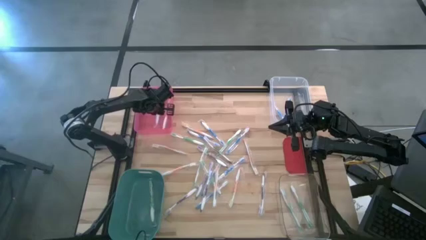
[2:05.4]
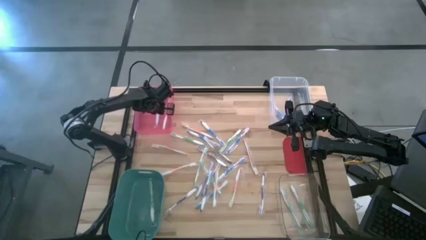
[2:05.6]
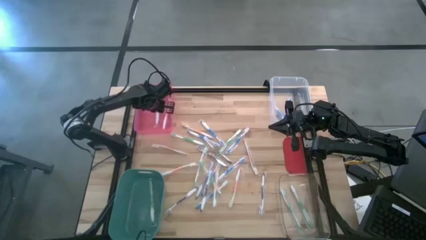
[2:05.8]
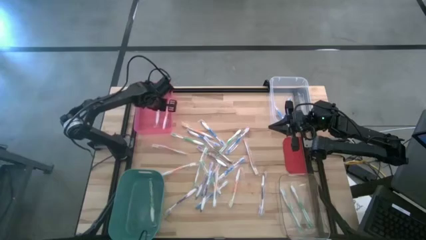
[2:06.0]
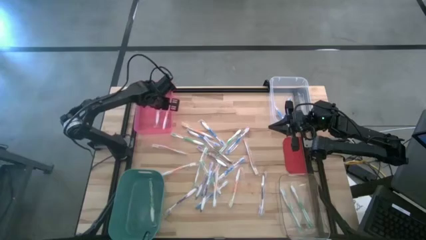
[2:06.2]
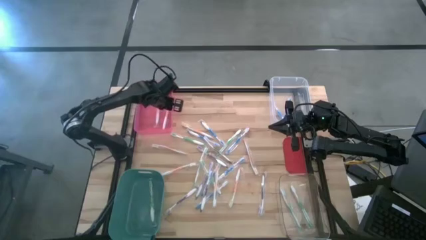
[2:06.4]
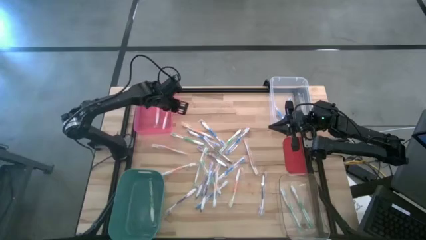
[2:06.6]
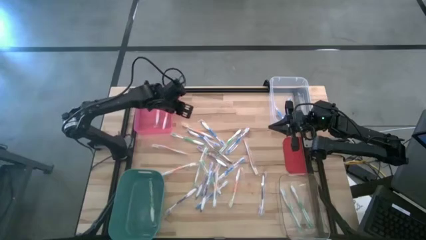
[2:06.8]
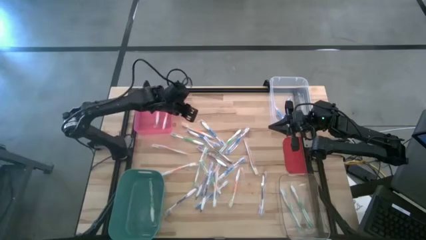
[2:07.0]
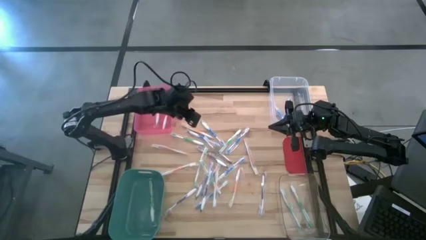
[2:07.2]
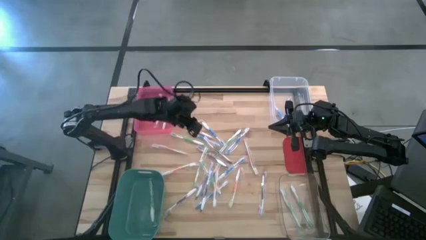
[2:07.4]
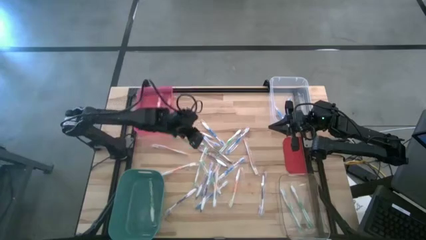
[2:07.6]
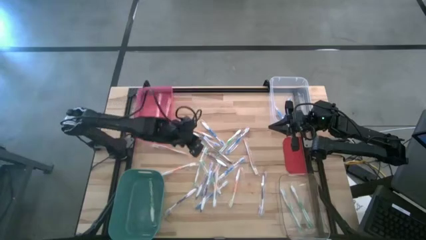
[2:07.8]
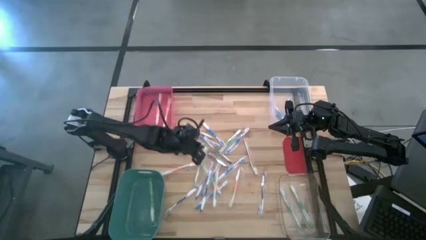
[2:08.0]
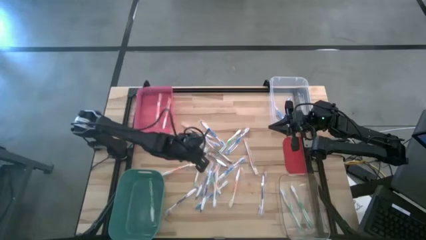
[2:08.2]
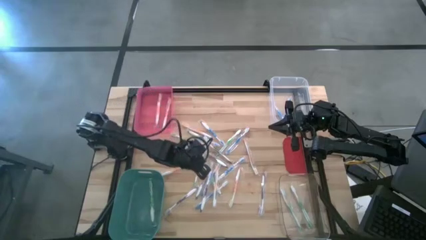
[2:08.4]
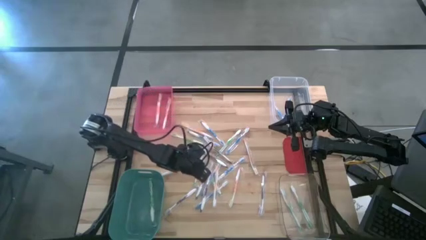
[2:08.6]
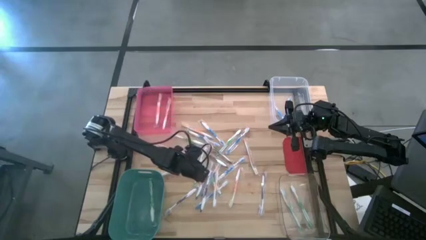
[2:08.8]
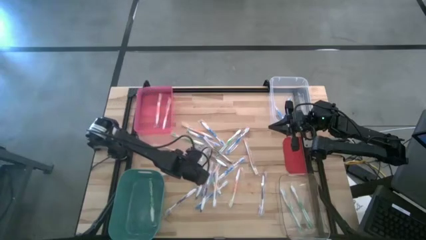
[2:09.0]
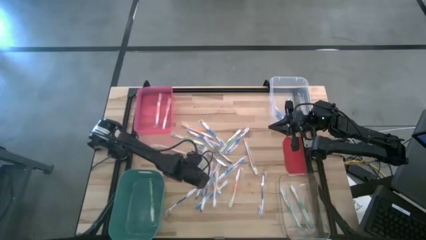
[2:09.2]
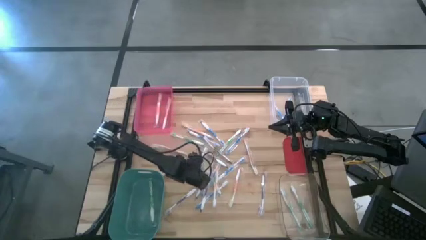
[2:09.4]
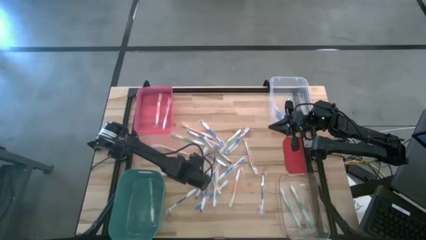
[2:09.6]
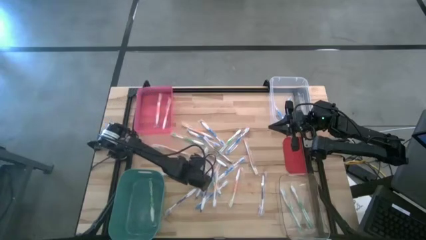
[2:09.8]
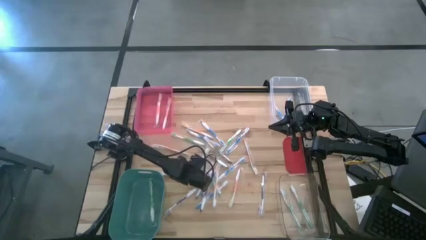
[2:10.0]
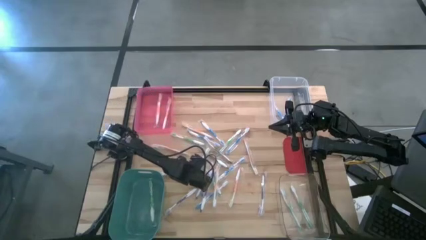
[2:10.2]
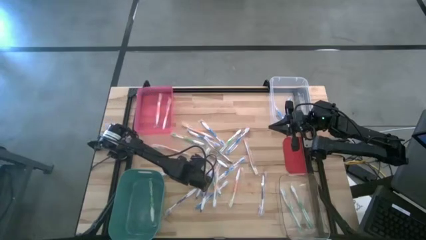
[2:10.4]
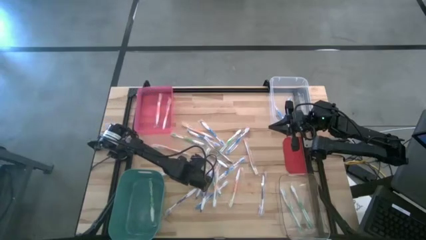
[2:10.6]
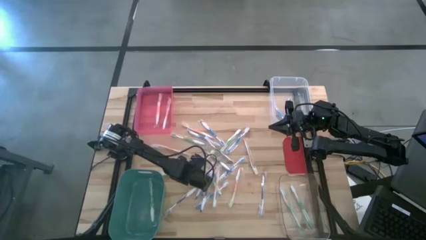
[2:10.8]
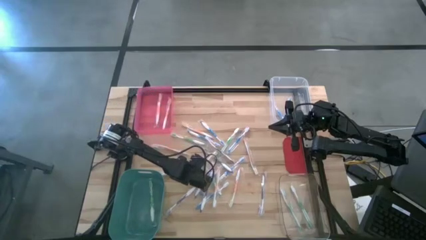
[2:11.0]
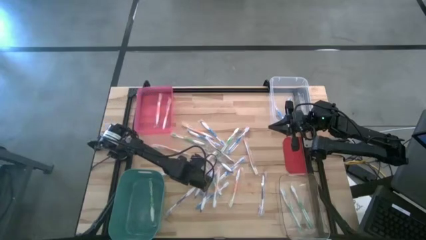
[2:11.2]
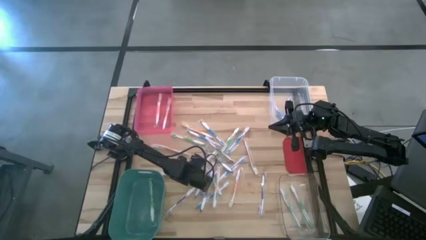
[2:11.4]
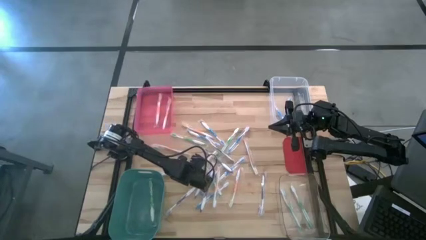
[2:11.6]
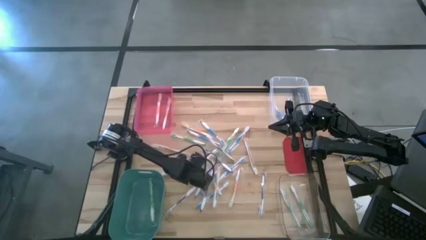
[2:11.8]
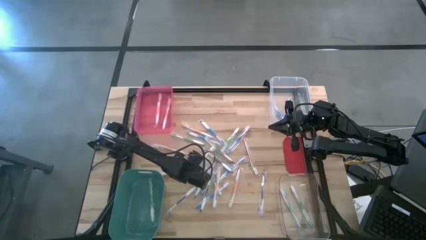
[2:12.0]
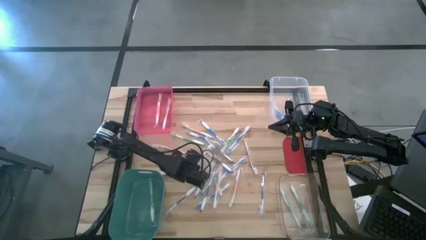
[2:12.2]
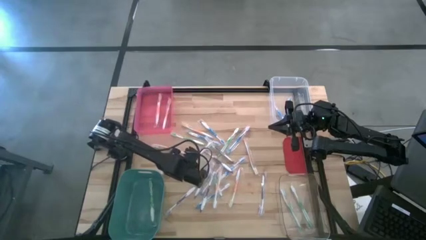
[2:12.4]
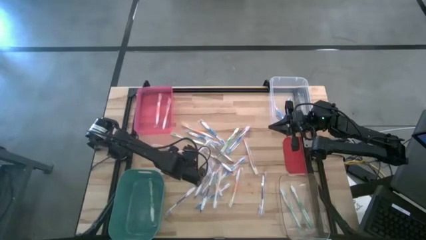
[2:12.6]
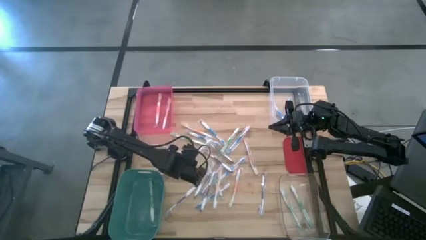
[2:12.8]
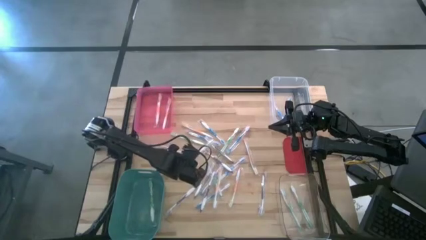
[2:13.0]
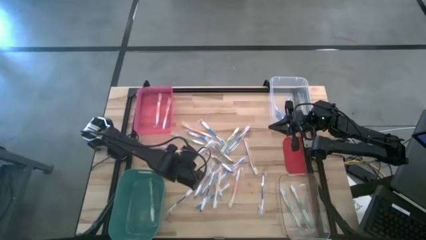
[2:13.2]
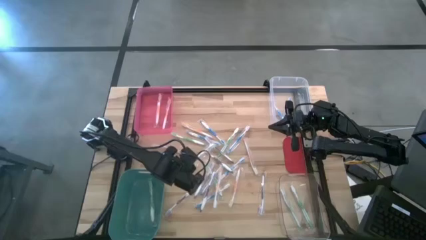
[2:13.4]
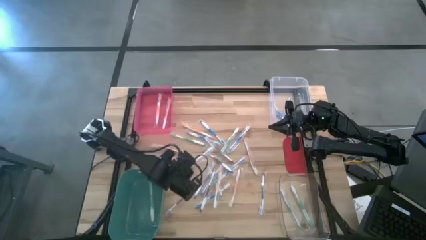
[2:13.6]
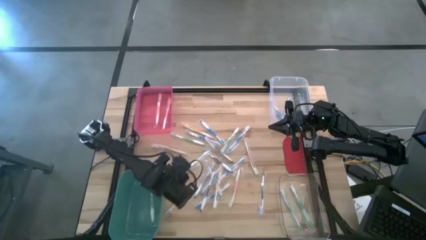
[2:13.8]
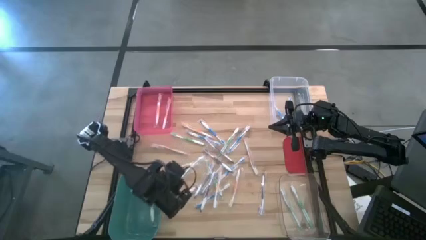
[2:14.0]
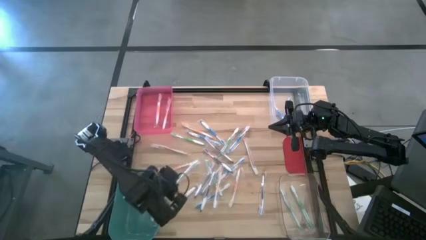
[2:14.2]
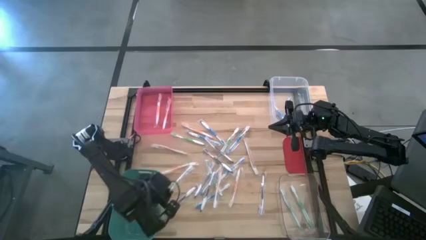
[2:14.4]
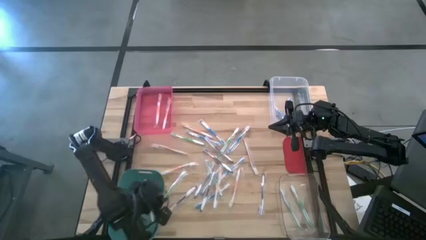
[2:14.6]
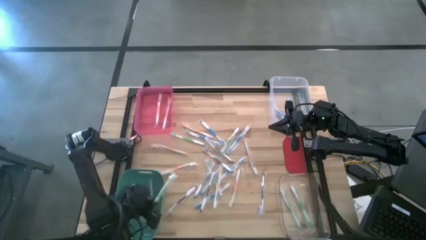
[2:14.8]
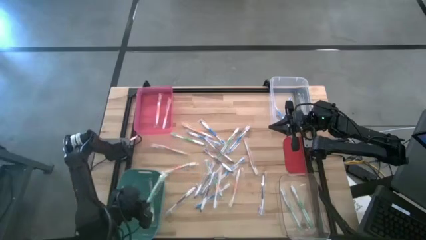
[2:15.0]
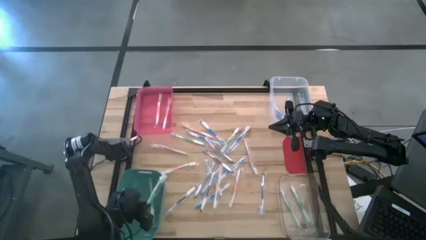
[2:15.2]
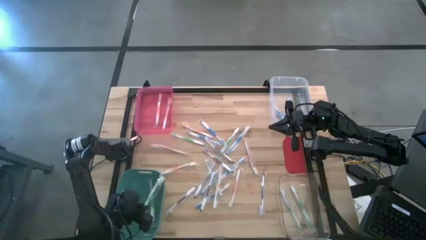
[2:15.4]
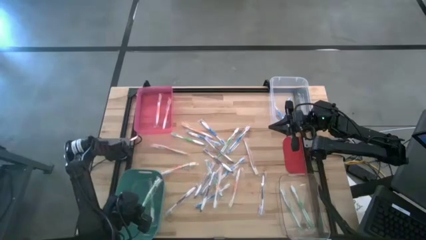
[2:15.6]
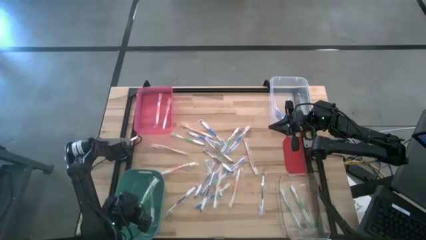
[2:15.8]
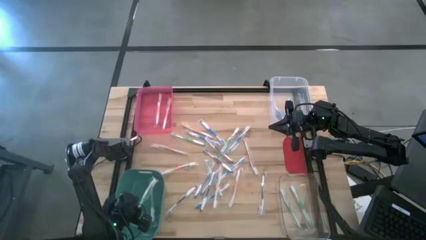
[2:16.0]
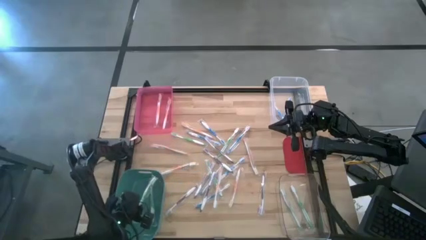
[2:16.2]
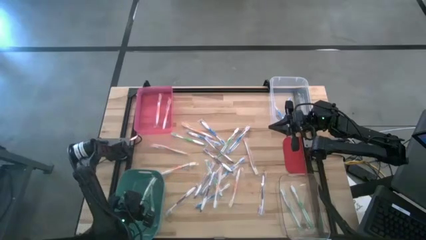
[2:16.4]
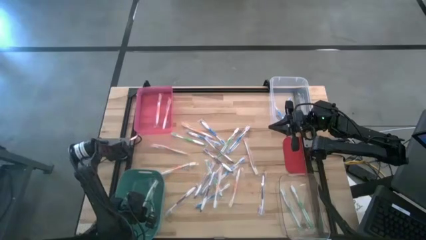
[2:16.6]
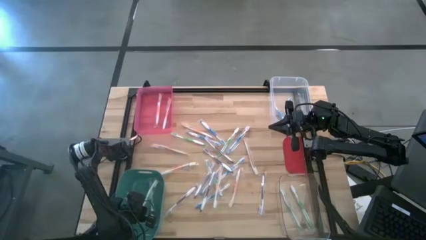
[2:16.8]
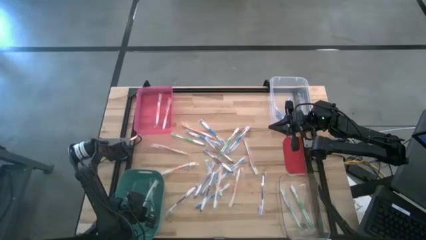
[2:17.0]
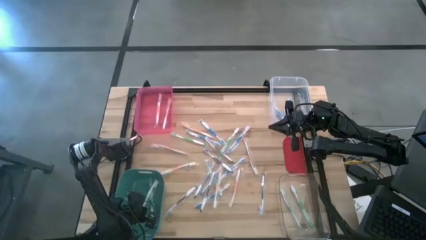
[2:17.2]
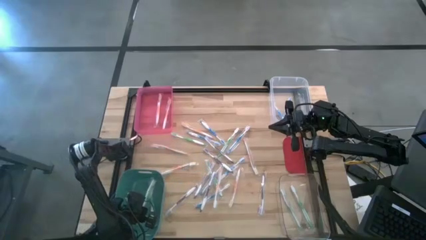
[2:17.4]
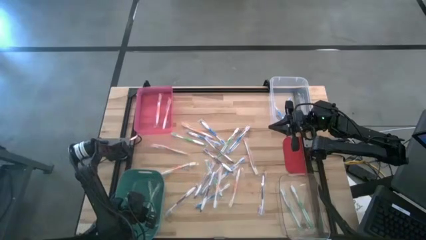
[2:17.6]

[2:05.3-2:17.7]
Task: Pick & Place Toothbrushes
Put the green toothbrush into the green bin

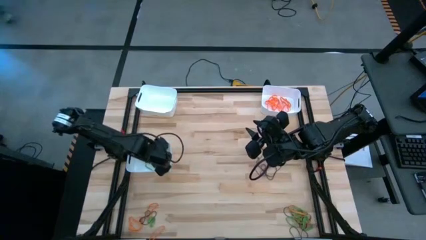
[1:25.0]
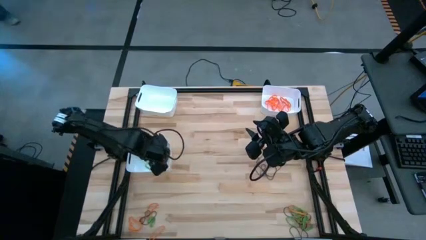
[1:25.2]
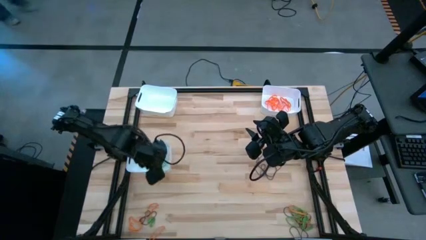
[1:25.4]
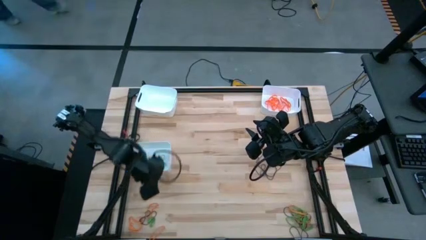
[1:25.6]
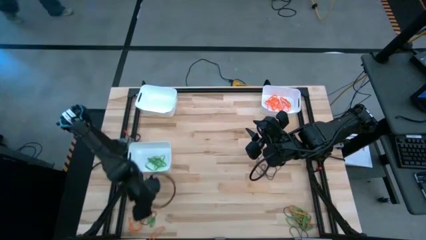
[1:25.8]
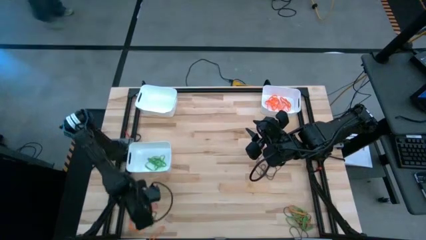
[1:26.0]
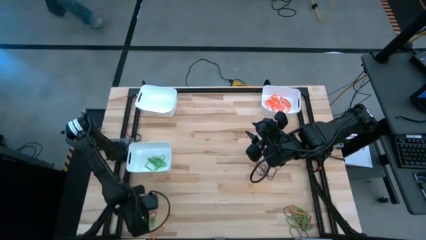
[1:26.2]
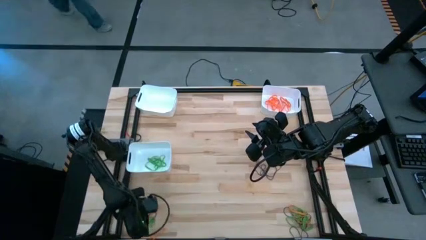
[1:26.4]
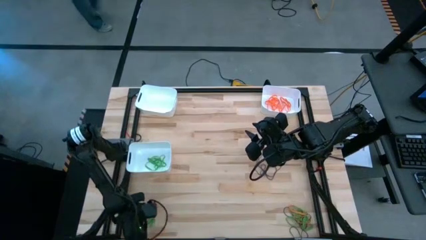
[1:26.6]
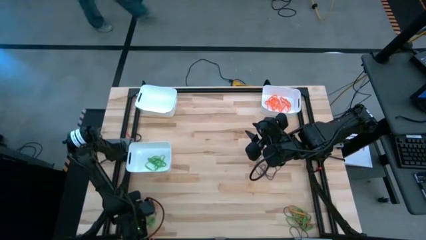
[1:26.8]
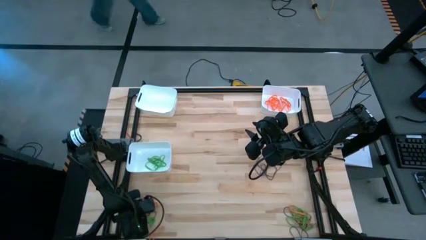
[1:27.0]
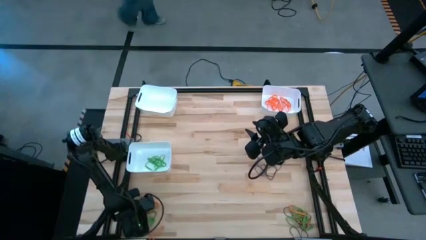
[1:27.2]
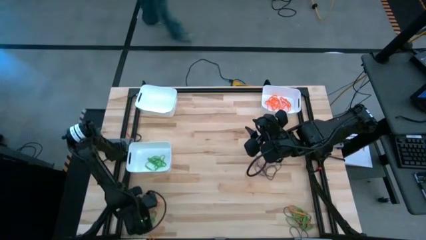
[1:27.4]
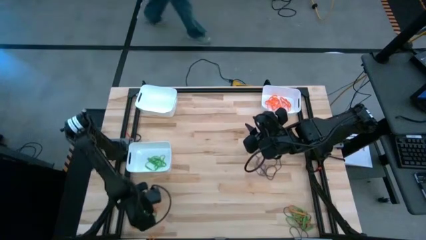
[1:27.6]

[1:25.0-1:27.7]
Task: Sort rubber bands into baskets
Put the purple rubber band into the top left white bin

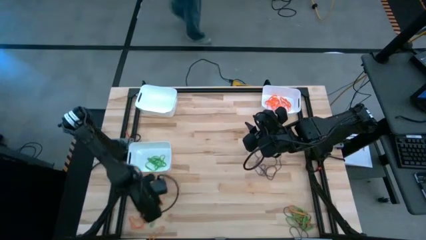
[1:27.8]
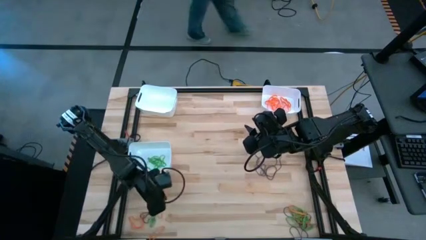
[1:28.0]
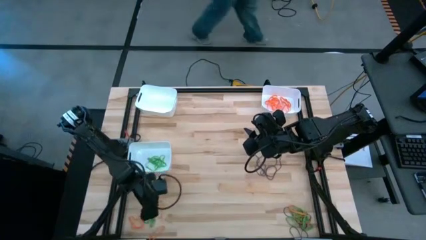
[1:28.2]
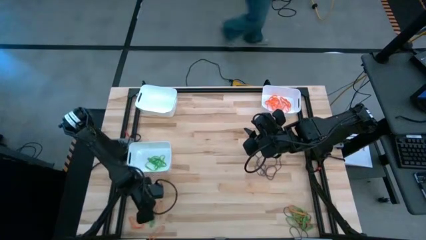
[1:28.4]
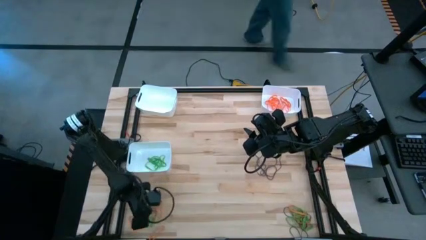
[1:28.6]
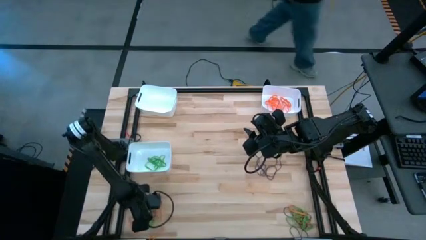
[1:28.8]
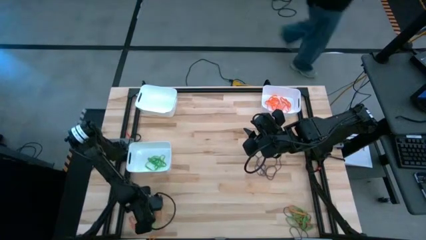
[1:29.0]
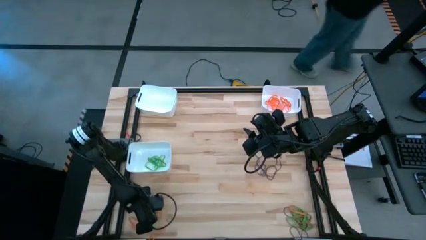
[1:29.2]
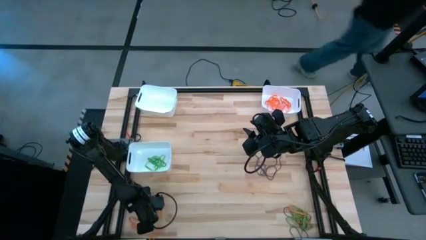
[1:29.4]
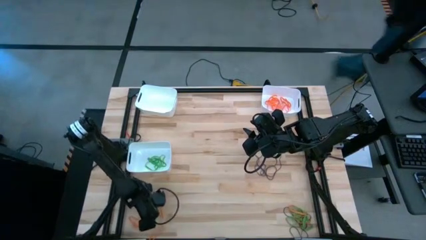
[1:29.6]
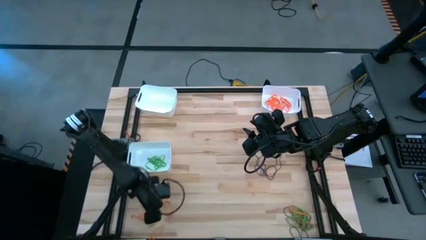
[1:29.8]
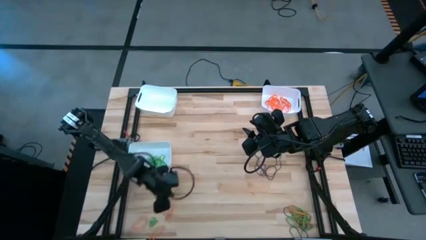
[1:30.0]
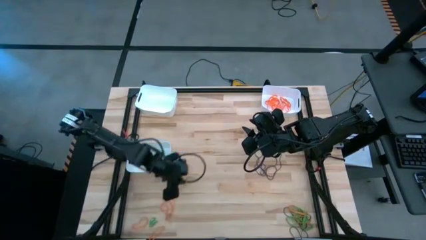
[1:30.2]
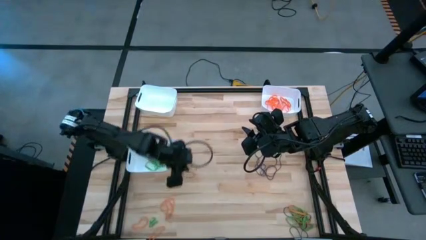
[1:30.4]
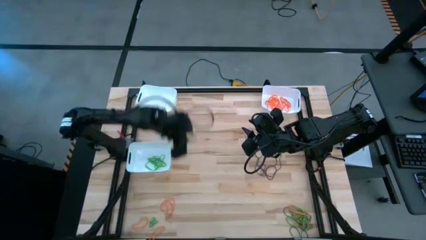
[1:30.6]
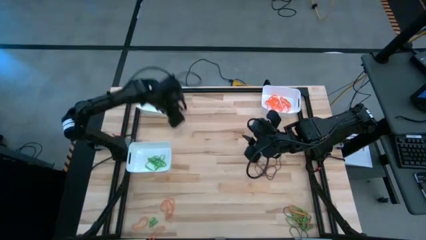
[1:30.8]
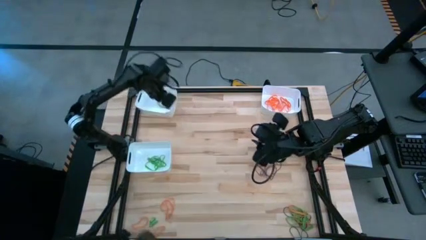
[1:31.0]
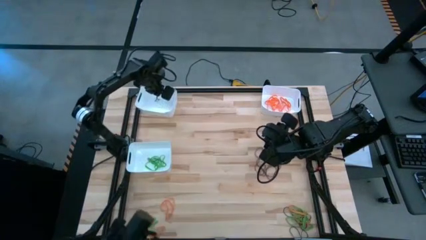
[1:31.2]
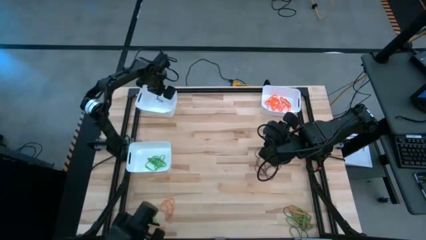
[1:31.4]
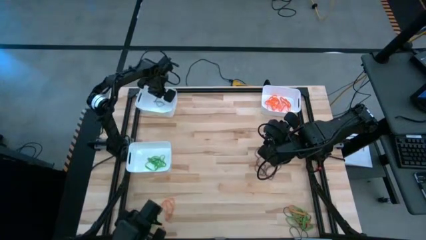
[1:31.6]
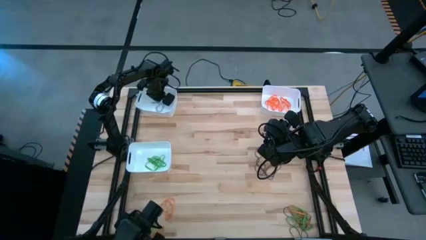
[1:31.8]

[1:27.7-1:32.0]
Put the purple rubber band into the top left white bin
